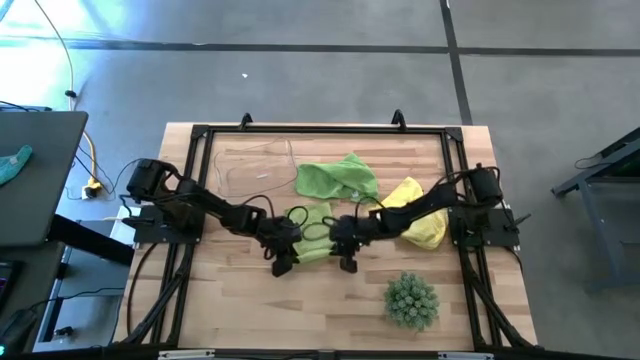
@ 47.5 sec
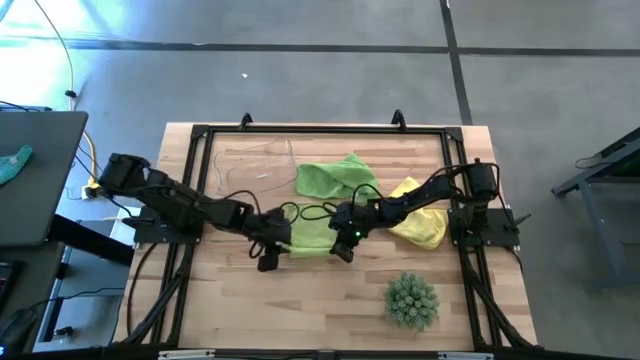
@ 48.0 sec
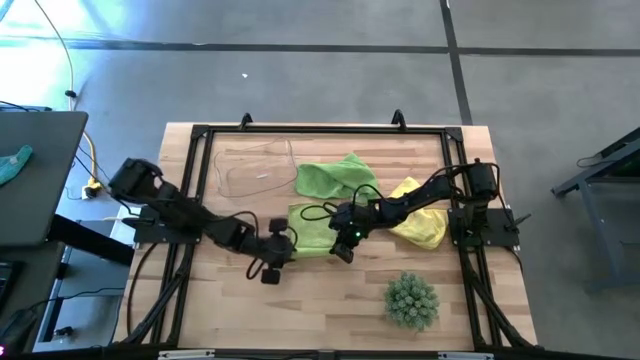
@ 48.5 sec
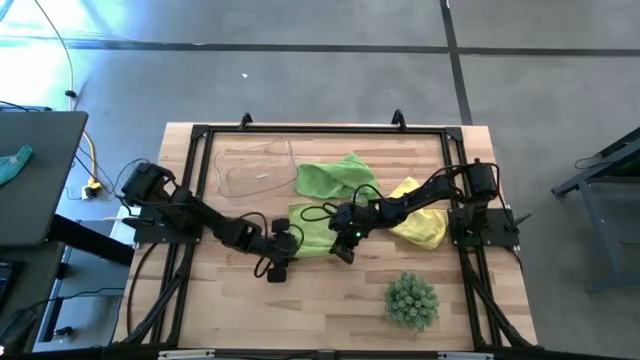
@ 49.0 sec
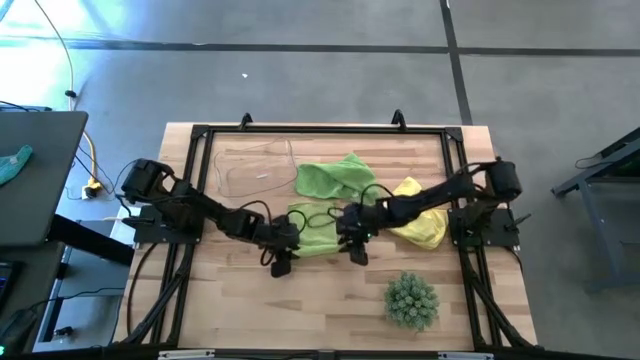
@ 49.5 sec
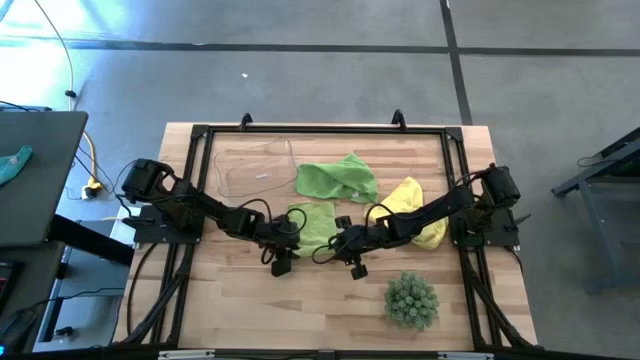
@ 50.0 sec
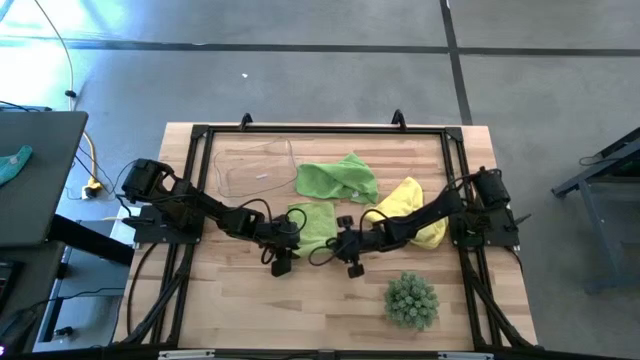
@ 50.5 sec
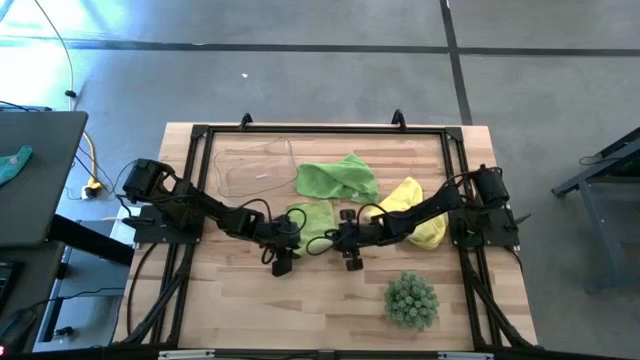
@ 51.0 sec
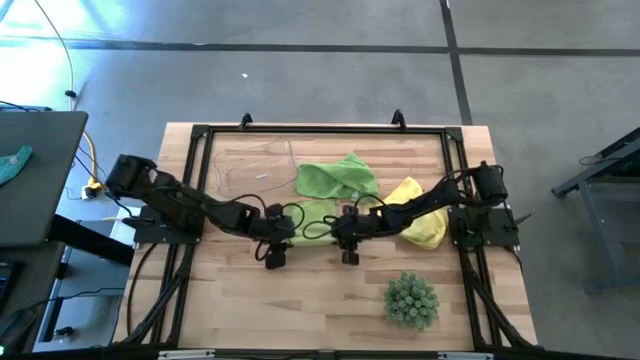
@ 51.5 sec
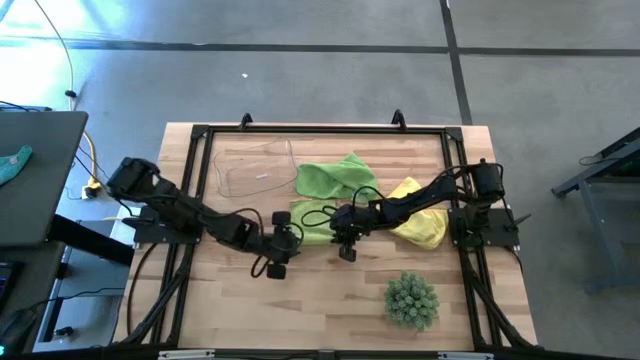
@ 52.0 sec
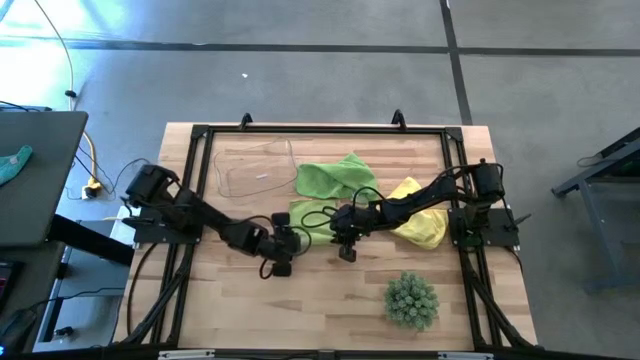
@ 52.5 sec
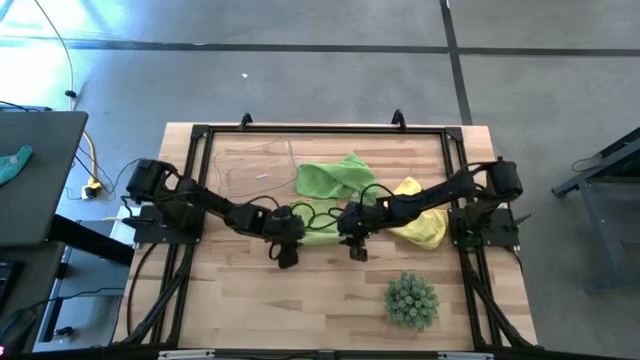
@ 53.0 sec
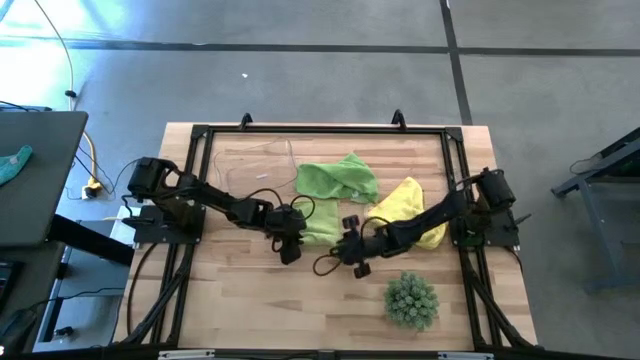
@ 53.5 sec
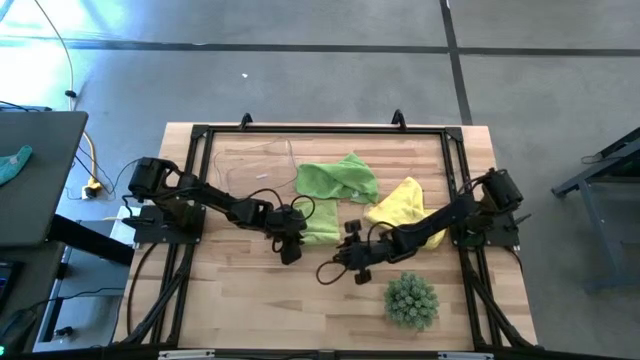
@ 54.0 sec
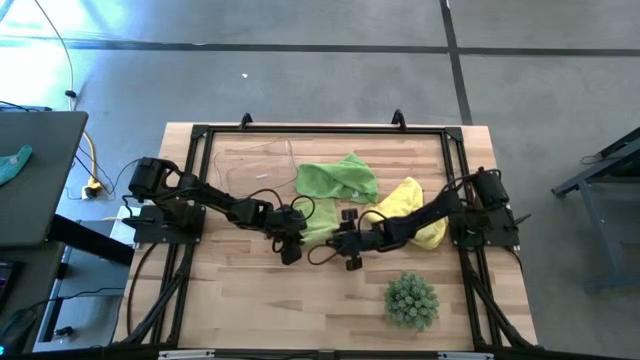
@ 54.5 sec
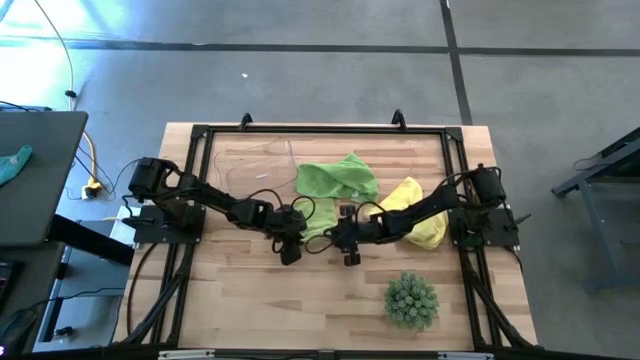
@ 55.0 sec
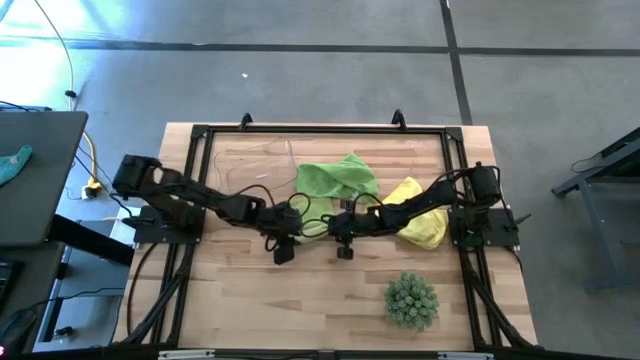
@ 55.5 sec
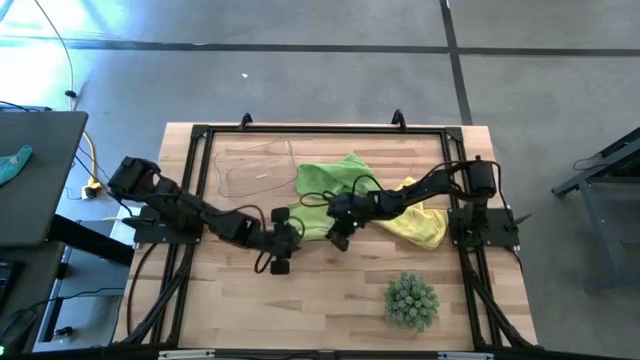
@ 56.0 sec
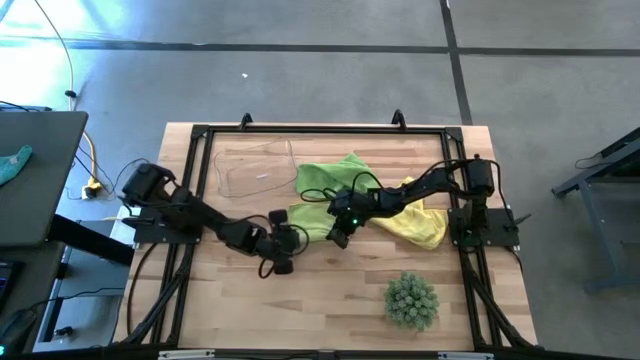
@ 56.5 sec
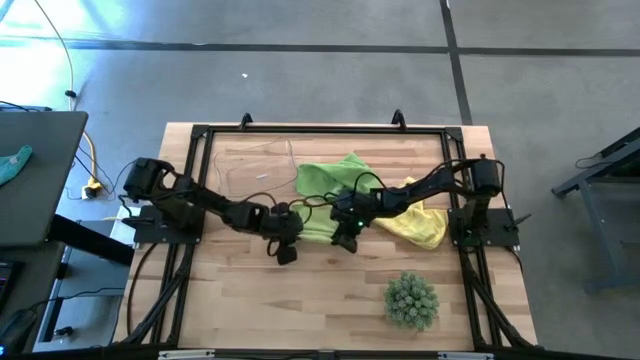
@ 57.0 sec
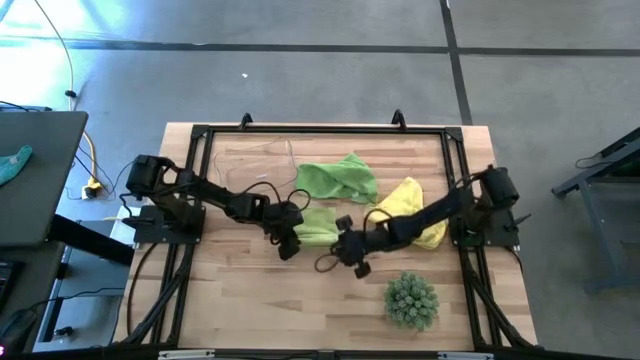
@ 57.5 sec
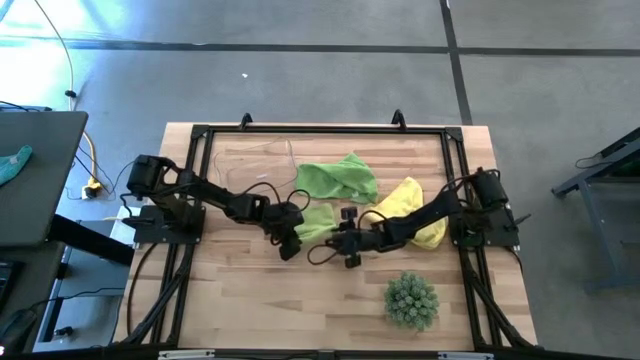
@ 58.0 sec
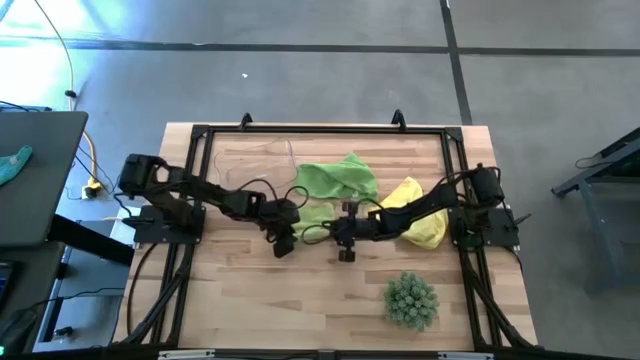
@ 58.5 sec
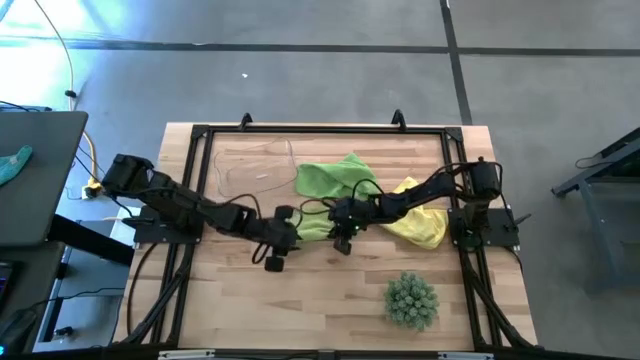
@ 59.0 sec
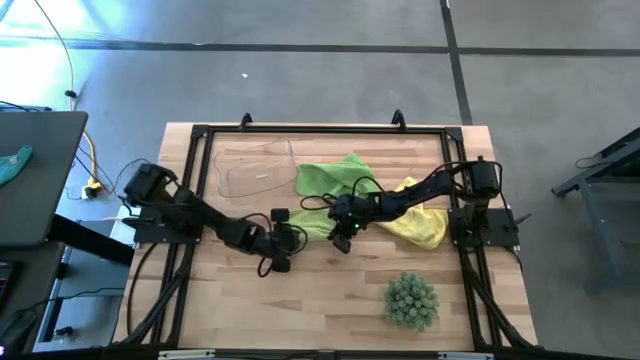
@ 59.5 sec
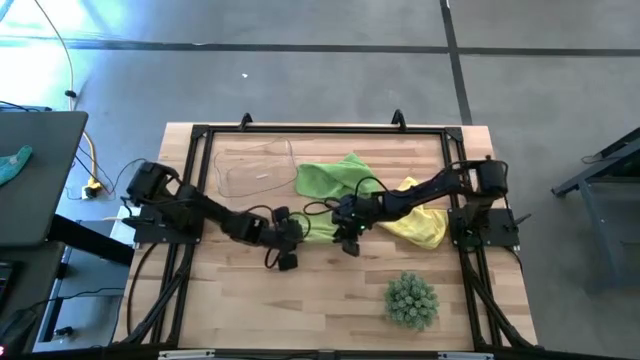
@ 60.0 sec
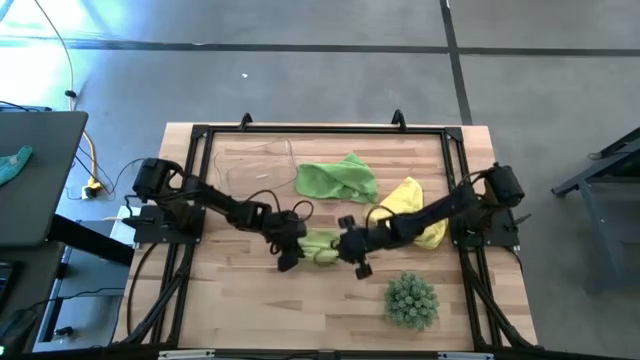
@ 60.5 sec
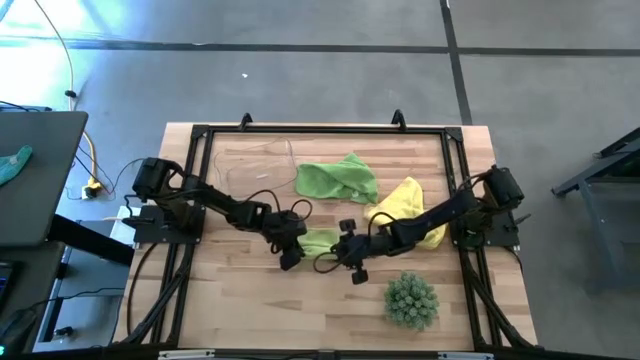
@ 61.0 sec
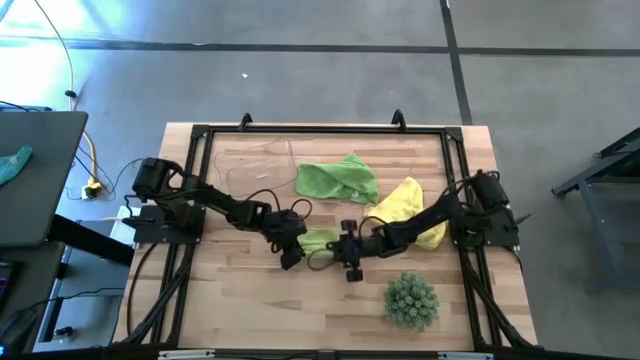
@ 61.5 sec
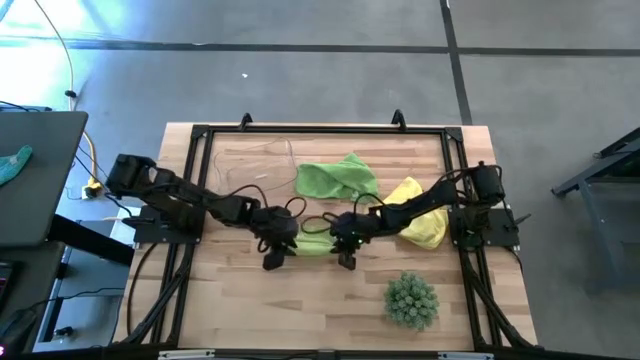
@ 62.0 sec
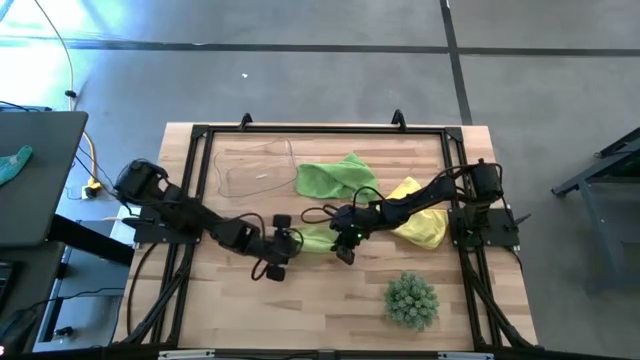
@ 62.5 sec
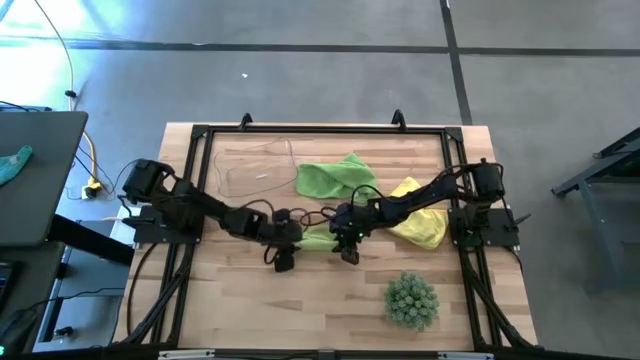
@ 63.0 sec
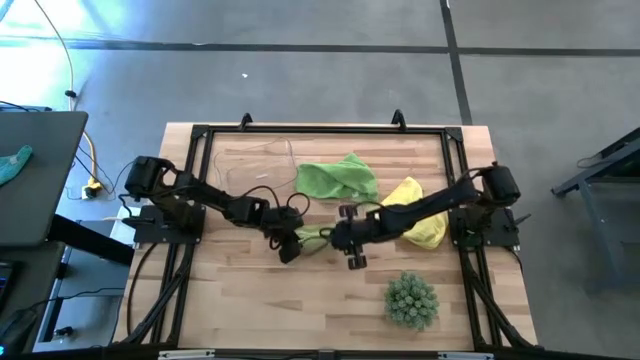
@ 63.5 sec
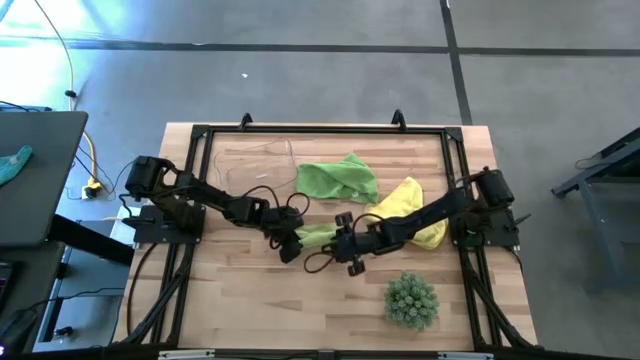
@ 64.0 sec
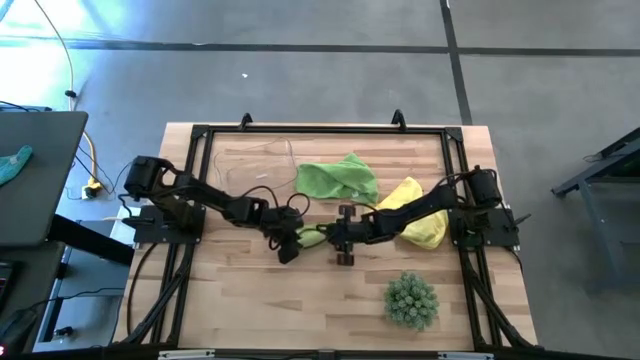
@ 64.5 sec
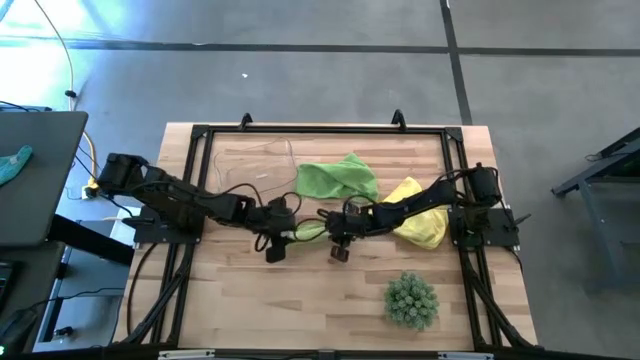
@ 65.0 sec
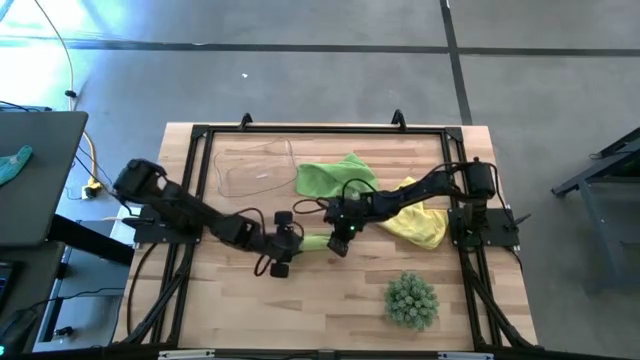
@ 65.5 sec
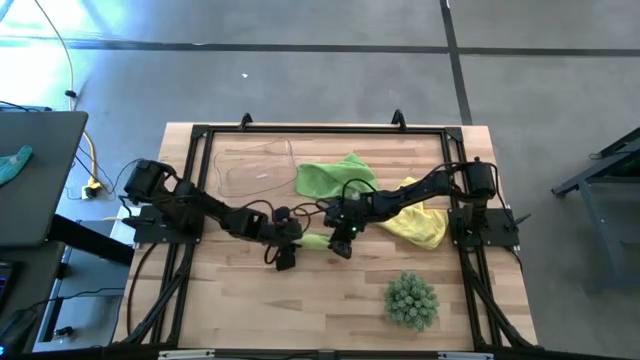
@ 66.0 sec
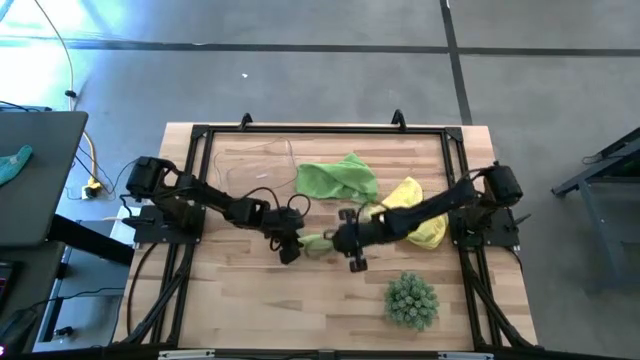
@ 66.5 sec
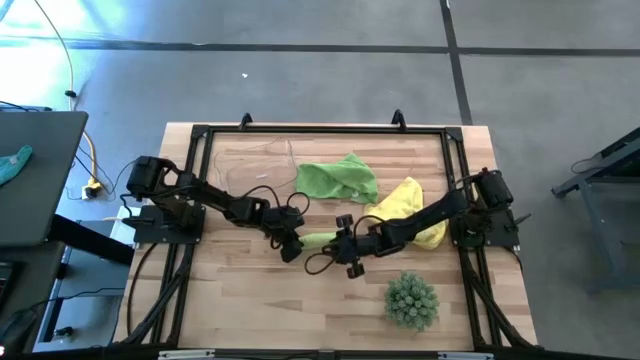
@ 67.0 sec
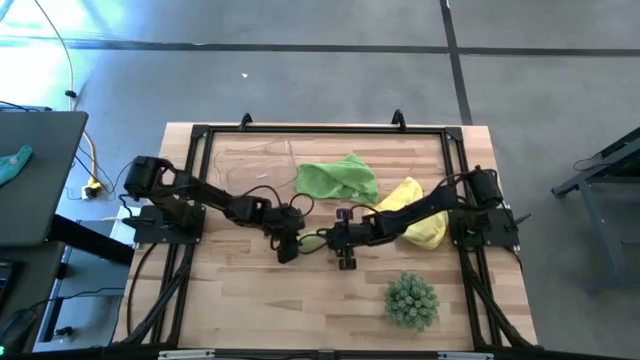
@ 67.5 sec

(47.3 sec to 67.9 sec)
Task: Roll microfiber towels into tight, uniform cylinder then place into a basket
Roll the light green towel

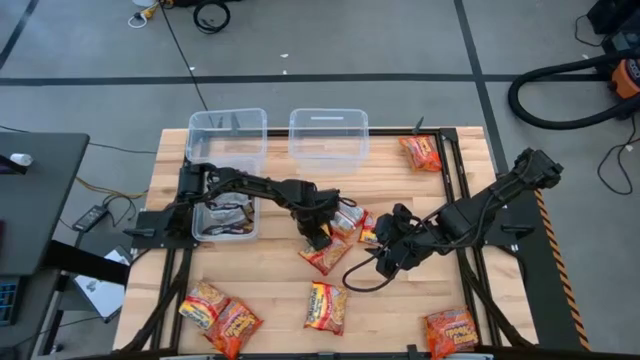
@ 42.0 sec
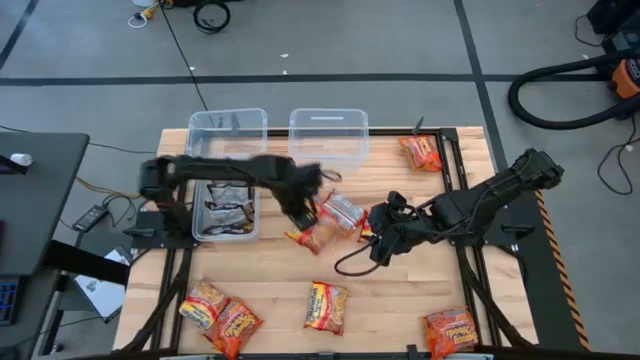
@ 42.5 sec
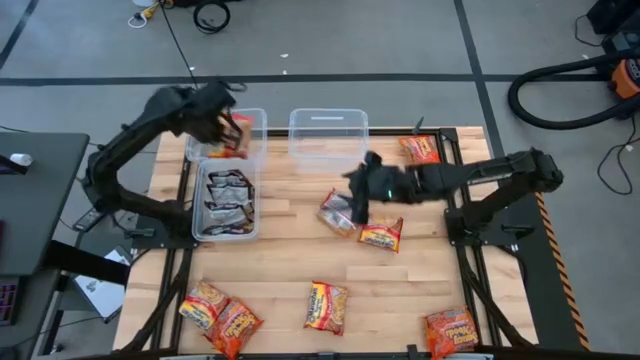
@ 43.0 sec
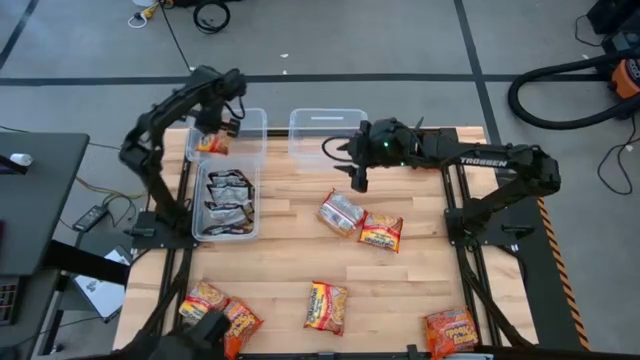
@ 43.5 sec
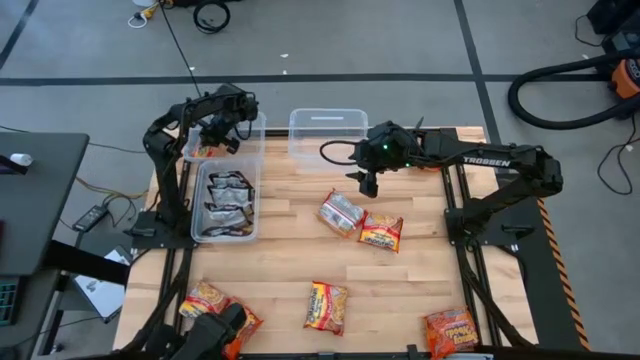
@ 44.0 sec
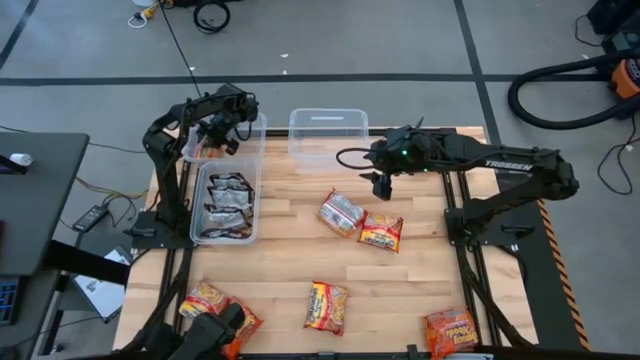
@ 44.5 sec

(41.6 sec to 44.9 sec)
Task: Sort Maruchan noodles
Put the center red noodle pack into the top left transparent bin
